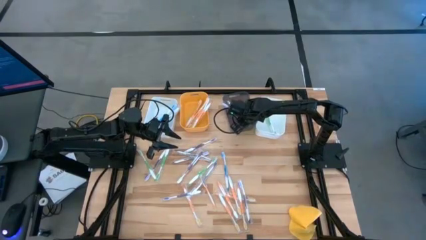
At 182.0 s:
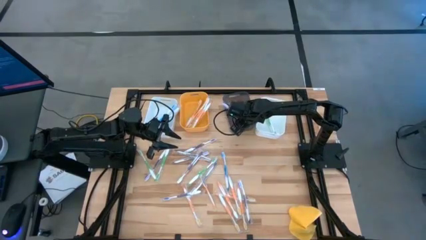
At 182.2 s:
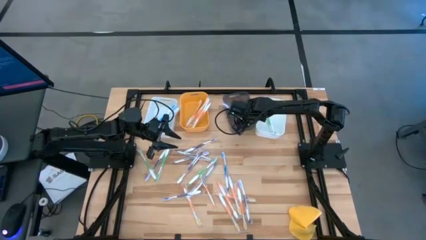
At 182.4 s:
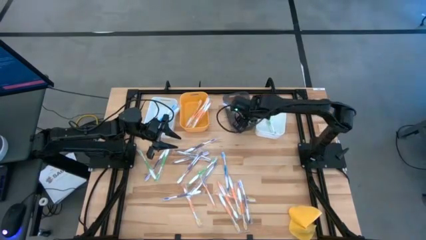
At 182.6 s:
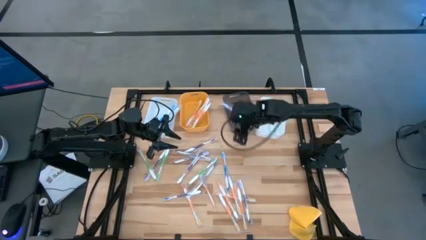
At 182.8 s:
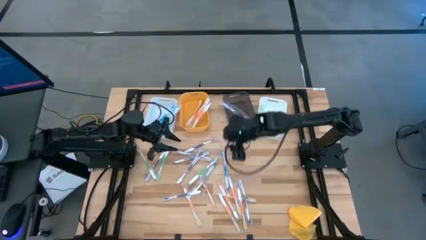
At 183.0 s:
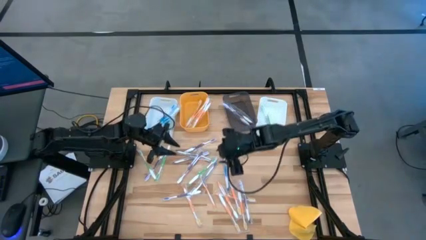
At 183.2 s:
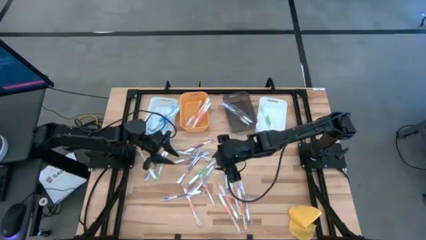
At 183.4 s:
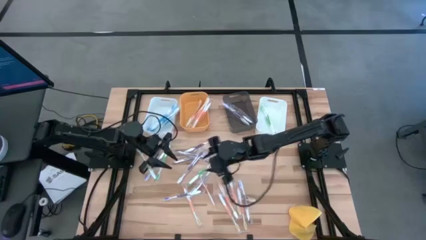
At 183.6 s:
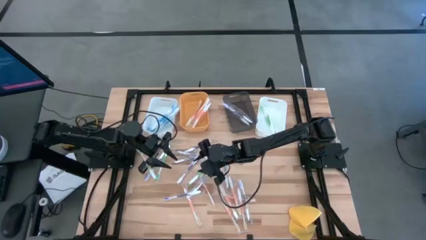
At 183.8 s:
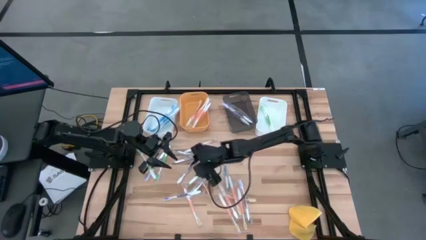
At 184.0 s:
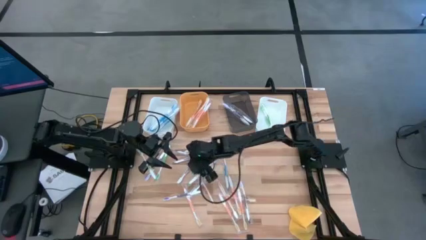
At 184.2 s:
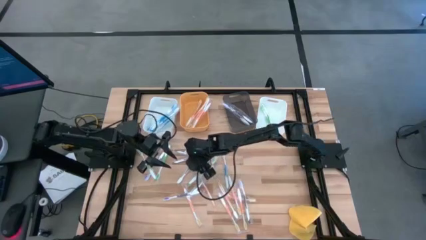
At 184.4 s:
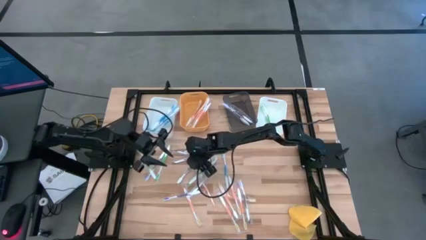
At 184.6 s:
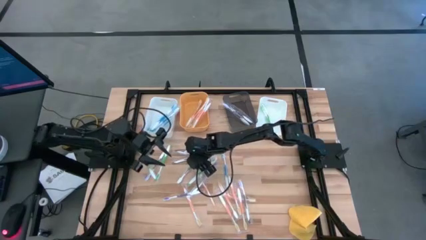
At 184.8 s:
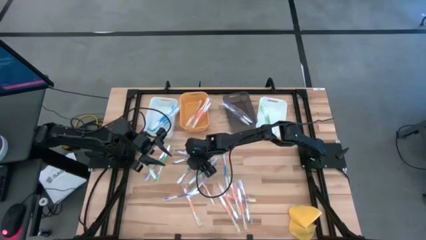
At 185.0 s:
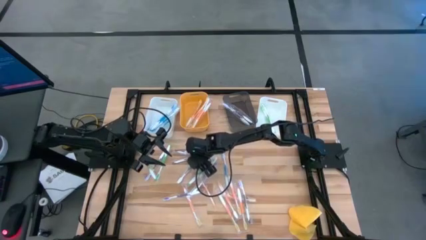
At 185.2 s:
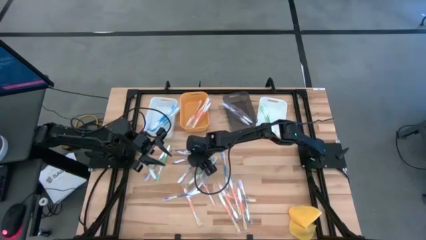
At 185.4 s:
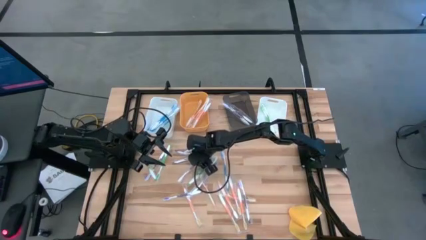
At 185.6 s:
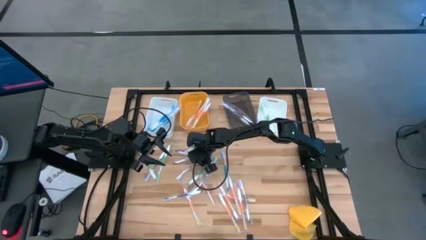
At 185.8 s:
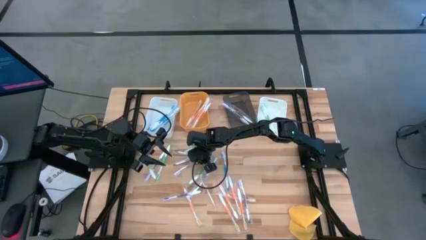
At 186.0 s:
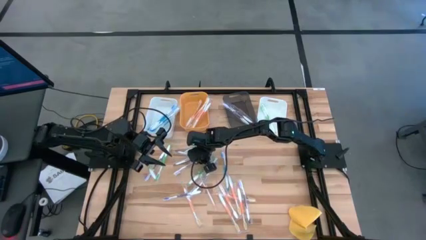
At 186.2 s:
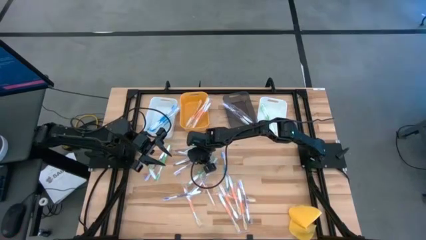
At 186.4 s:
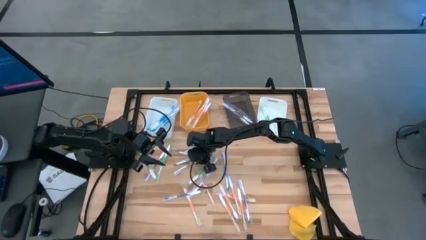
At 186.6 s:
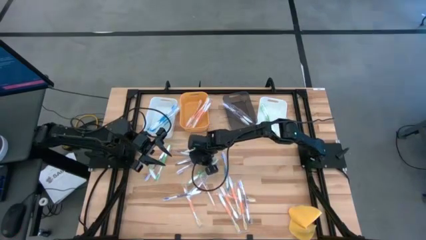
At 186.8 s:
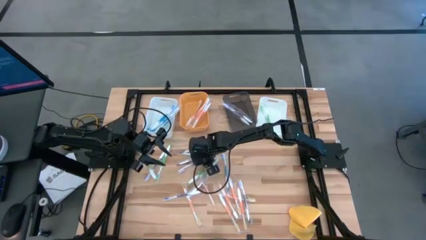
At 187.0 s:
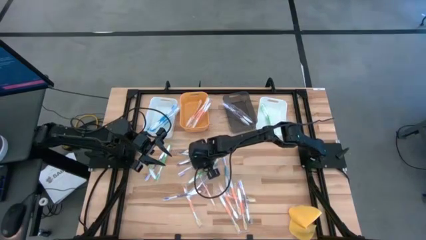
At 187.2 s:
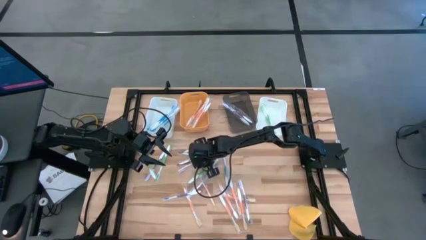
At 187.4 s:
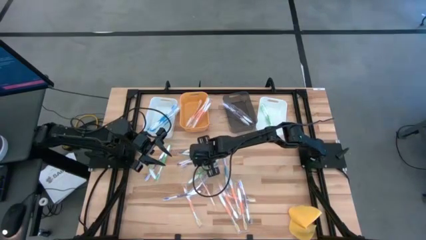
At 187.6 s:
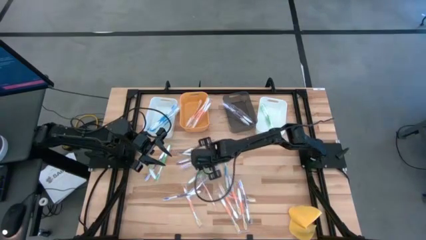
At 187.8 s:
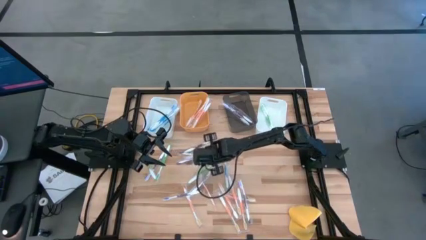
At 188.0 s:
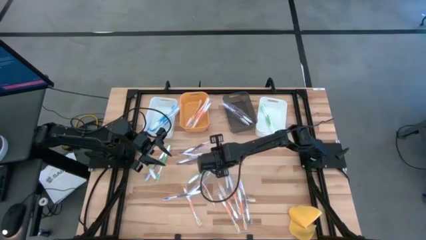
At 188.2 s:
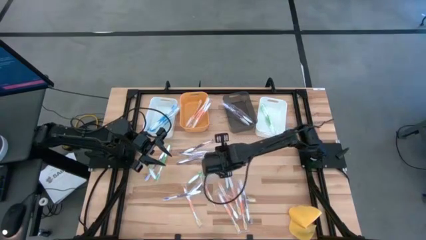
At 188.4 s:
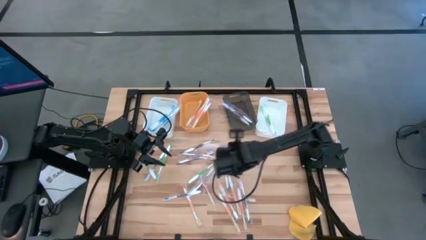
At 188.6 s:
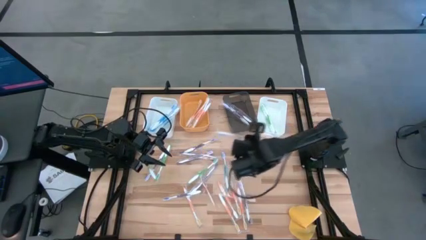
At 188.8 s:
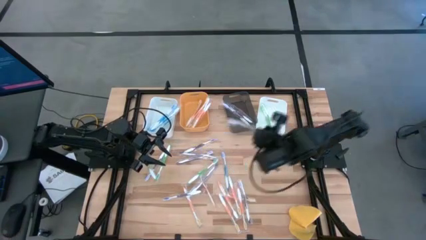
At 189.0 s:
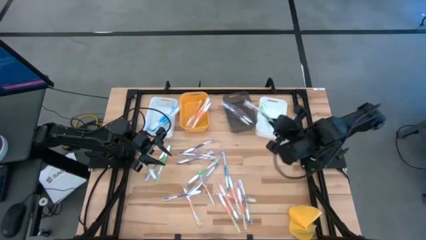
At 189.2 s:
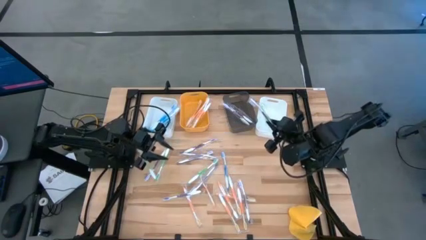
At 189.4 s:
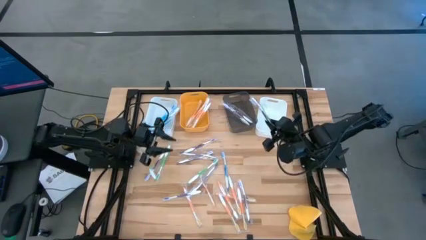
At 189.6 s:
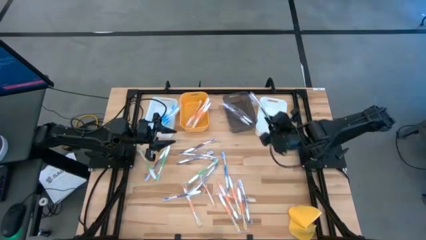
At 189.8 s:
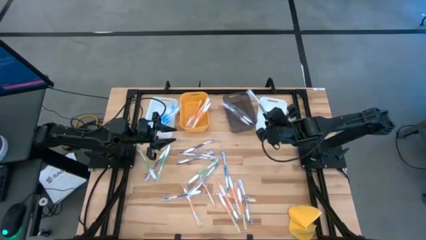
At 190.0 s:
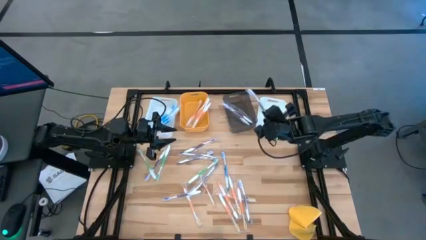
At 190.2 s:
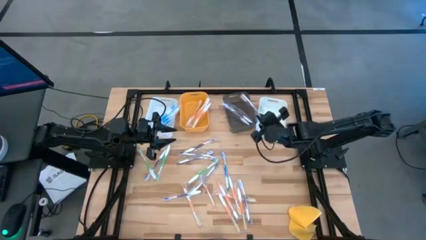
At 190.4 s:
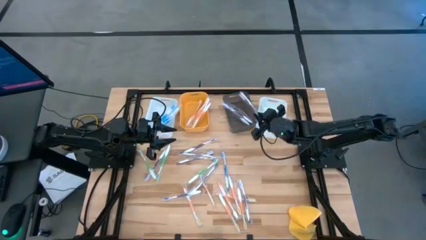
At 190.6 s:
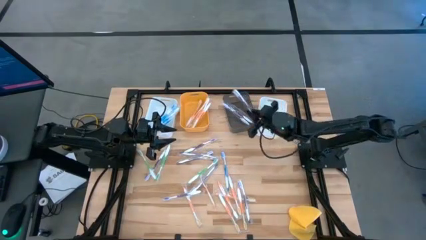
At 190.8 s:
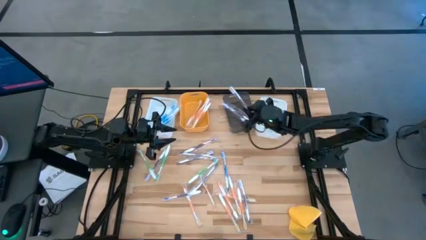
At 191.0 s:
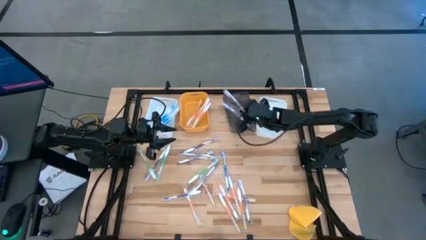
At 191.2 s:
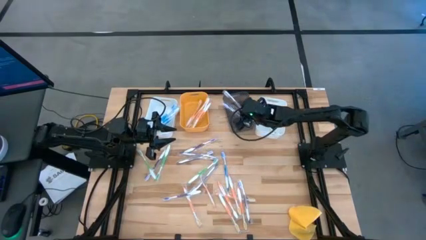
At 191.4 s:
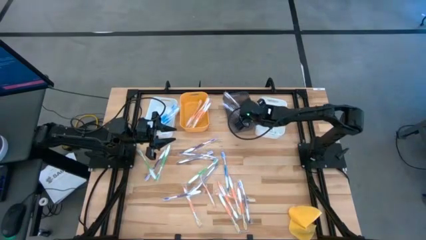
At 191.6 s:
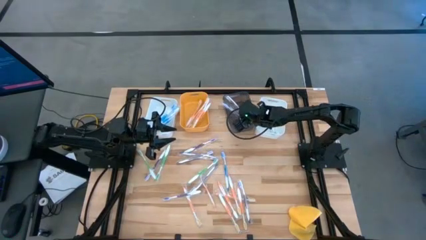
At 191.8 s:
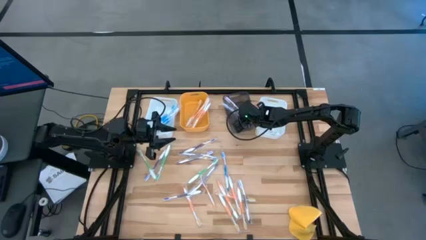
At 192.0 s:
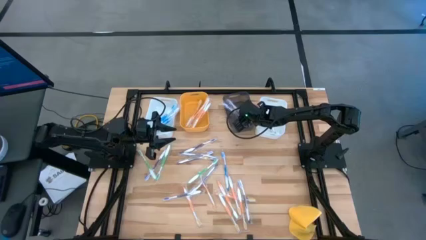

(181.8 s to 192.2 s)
Task: Pick & Place Toothbrushes
Put the violet toothbrush into the gray bin

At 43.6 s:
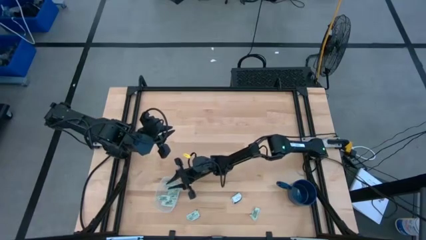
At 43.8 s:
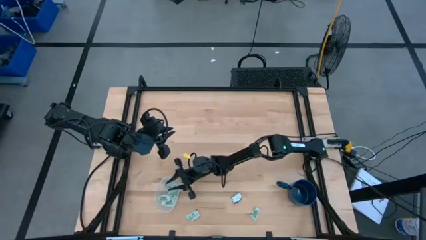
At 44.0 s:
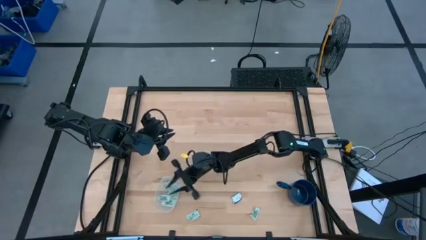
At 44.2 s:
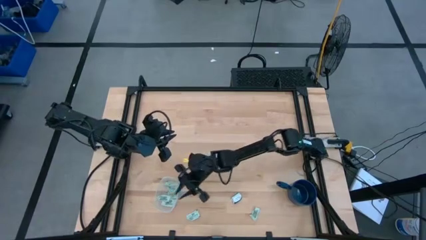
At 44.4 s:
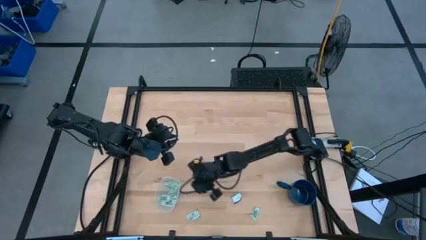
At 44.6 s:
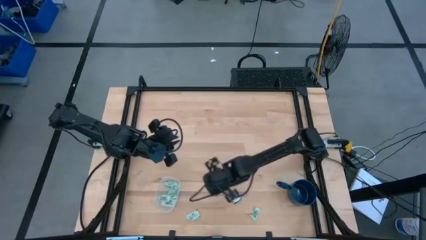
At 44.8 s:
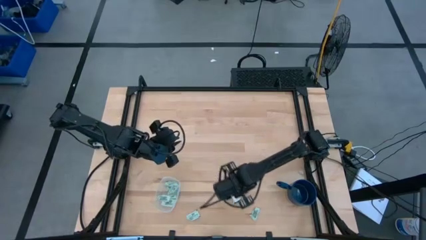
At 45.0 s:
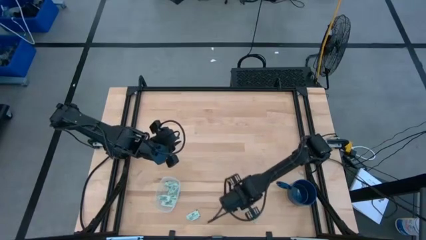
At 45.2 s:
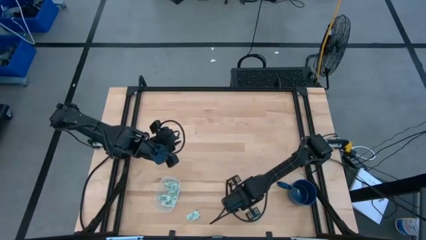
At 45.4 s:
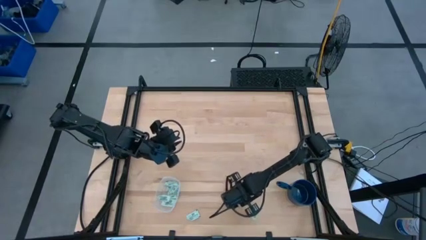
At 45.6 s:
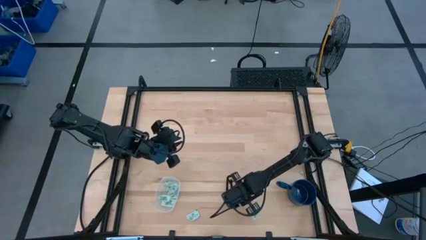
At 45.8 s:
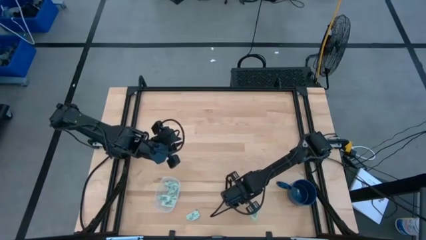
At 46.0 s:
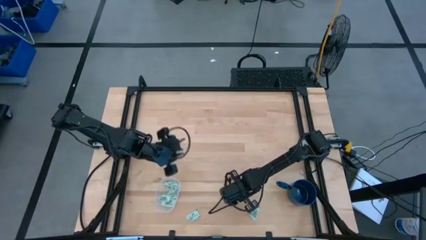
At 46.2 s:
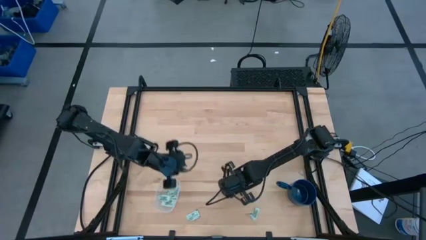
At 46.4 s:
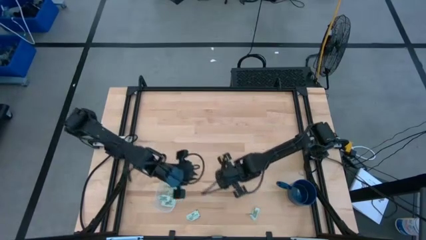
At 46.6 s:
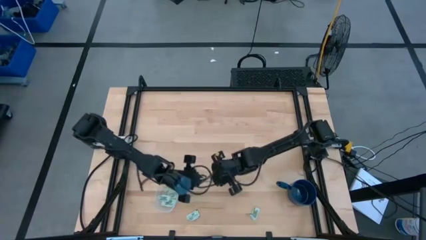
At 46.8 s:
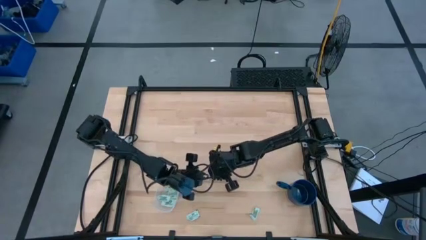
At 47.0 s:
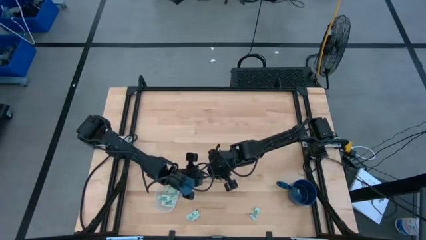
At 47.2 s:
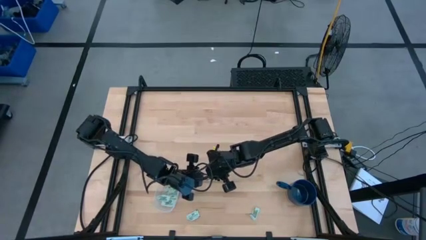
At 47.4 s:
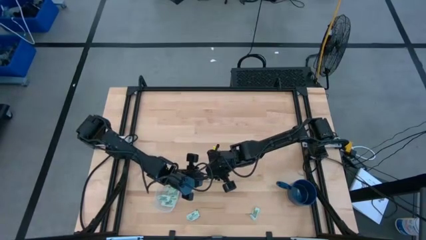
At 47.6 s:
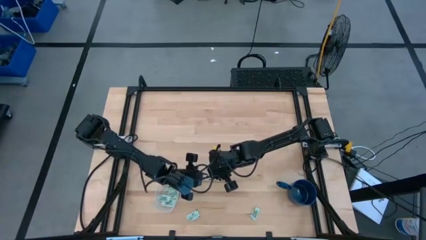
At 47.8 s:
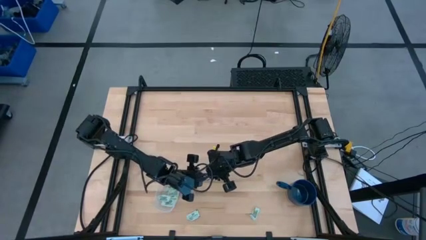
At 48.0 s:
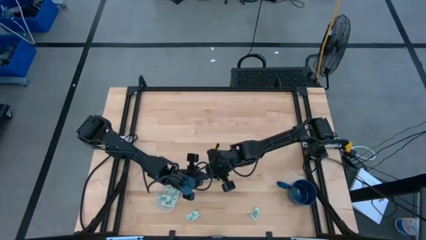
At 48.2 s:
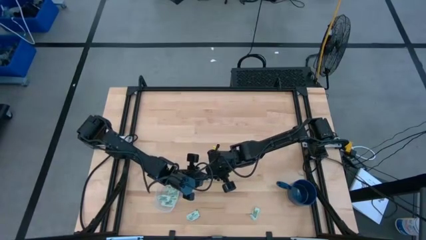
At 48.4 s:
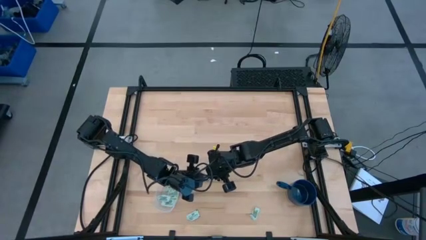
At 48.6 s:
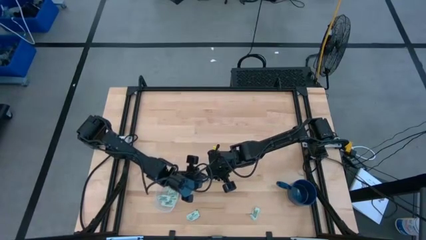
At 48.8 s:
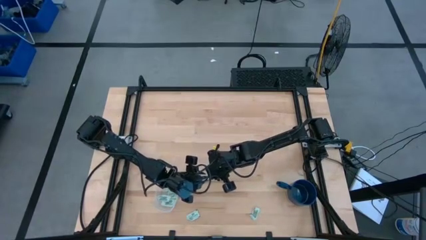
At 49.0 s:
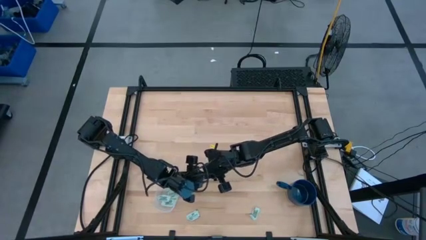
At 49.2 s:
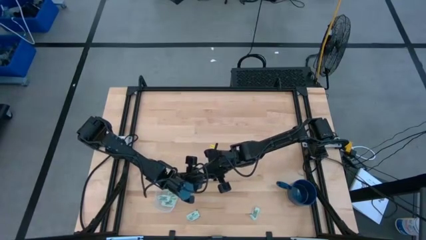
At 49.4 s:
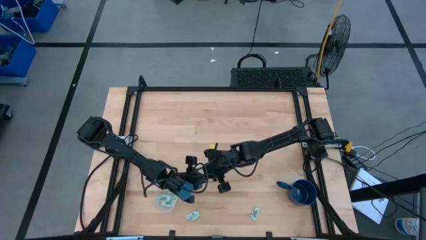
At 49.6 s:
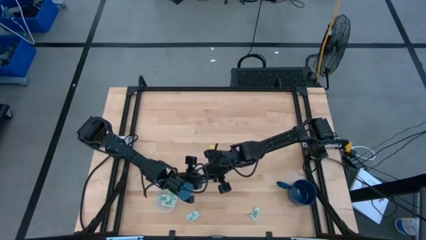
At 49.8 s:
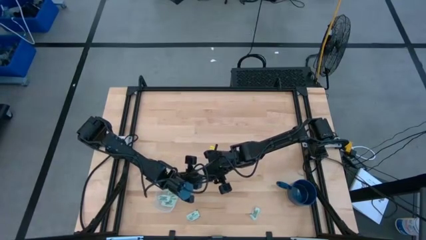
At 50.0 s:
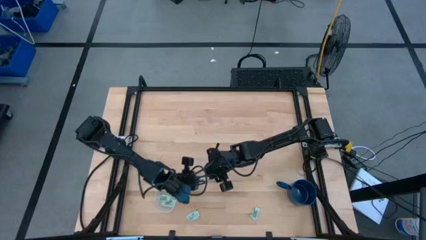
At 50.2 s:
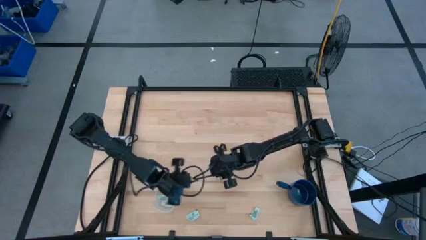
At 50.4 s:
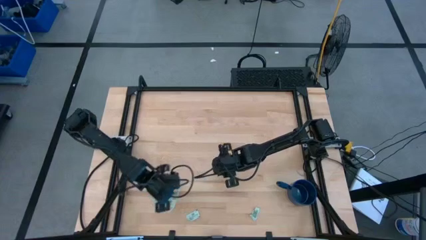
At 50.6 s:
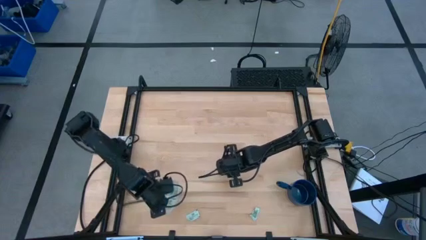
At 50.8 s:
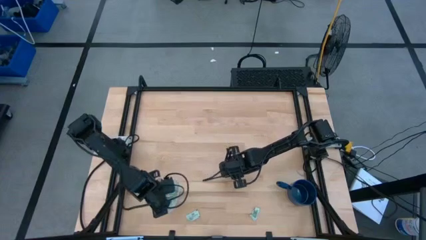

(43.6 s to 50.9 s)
Task: Pick and place Stevia / Truvia into bins
Put the truvia packet into the transparent container
